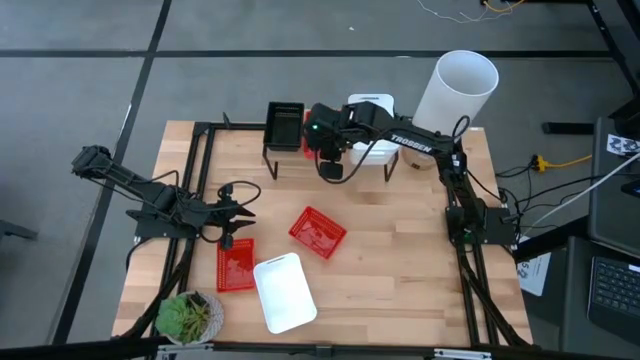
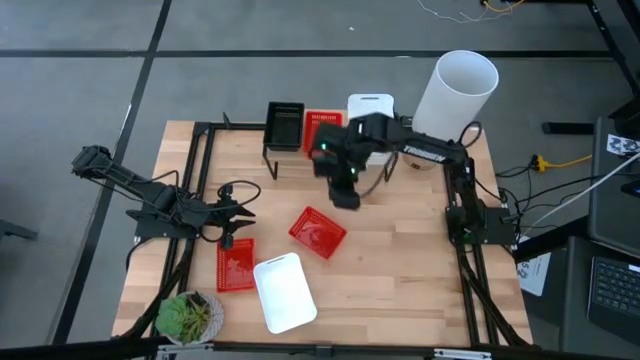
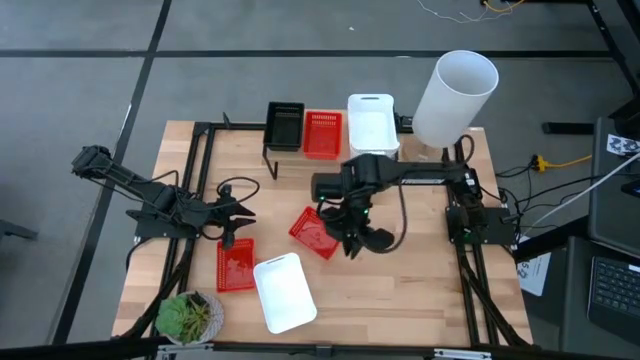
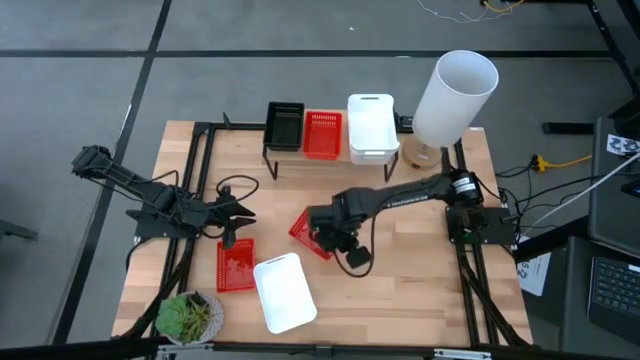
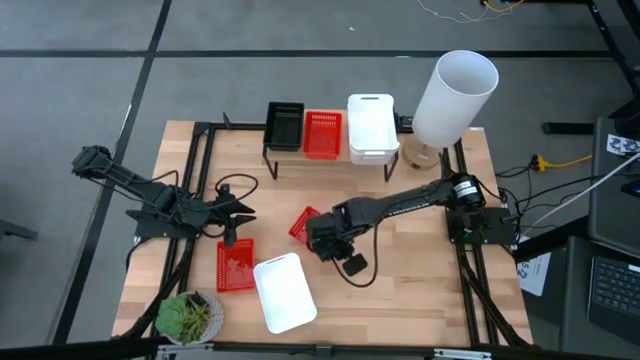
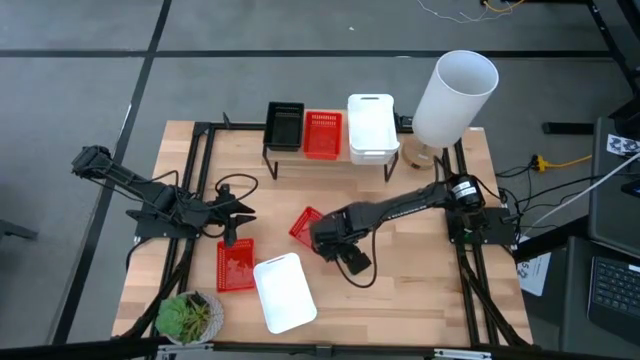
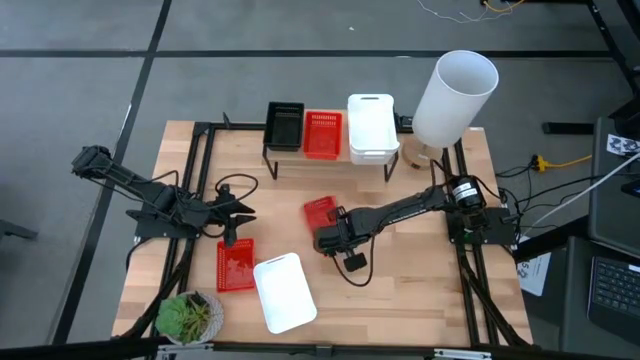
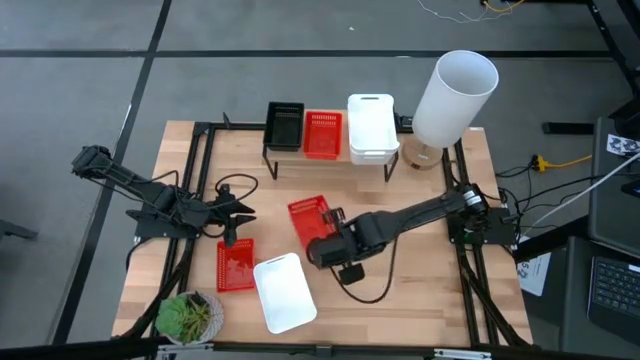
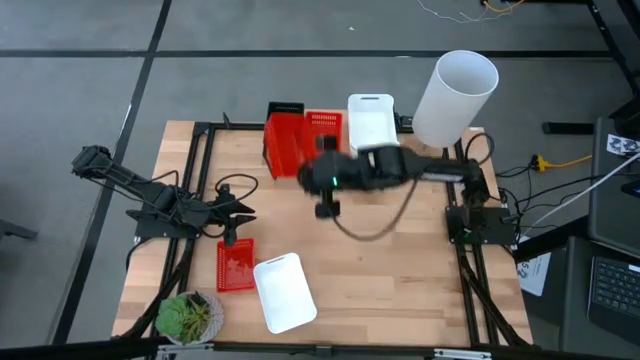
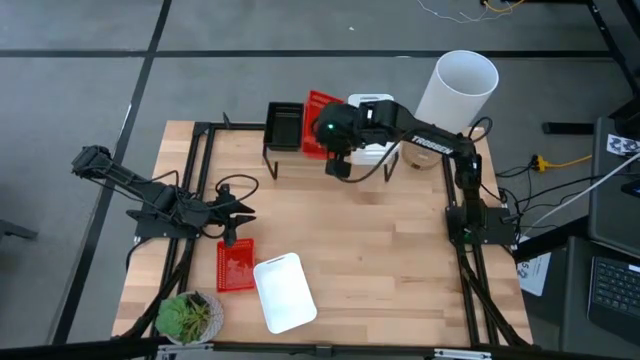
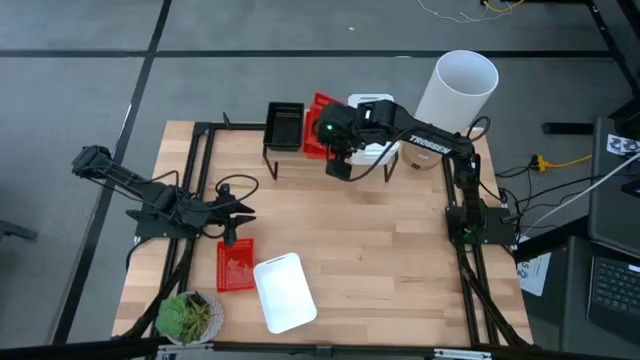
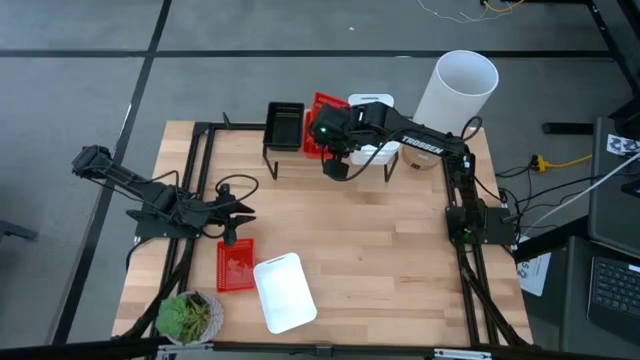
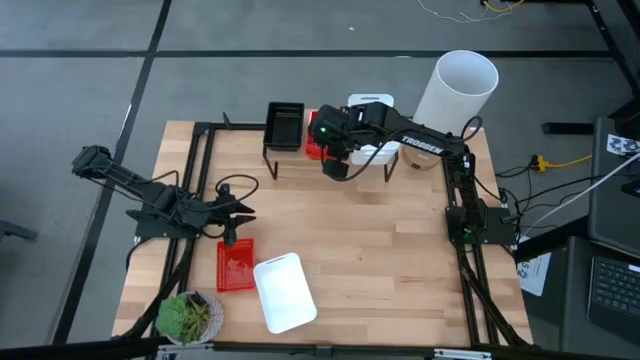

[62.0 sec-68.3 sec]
Task: Stack baskets on shelf by color
Stack the right red bin on top of the red bin on the shelf

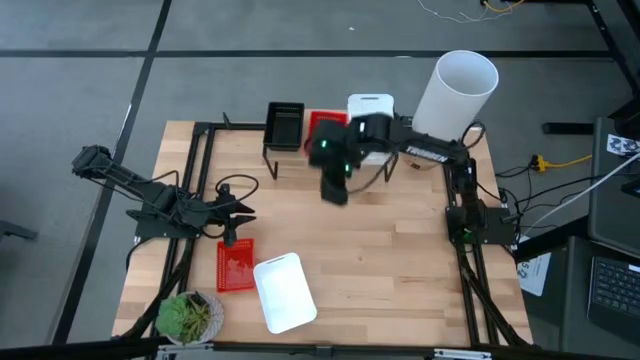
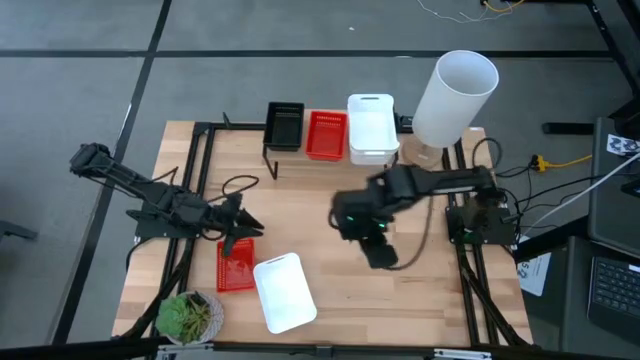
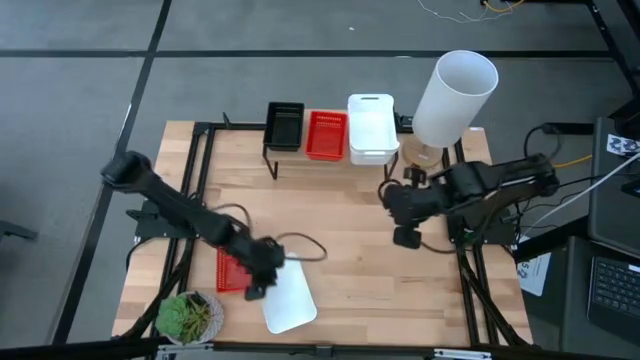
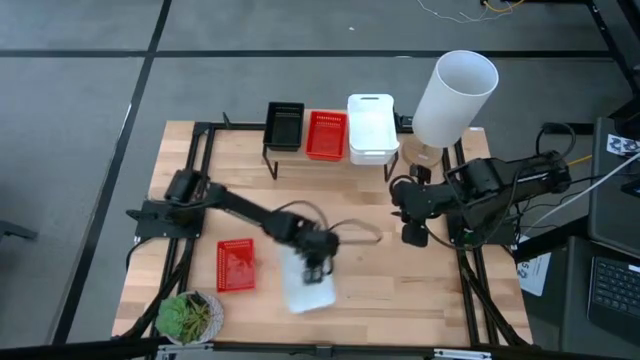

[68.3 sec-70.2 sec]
Move the white bin to the middle of the table

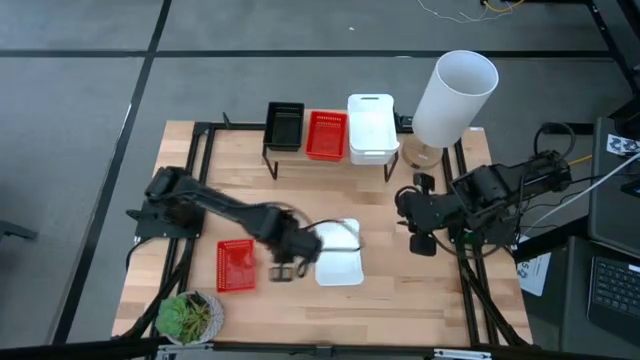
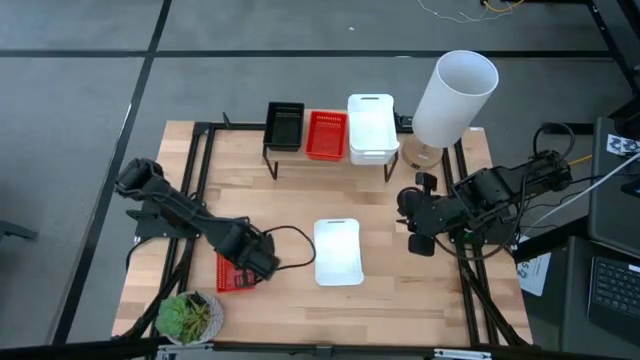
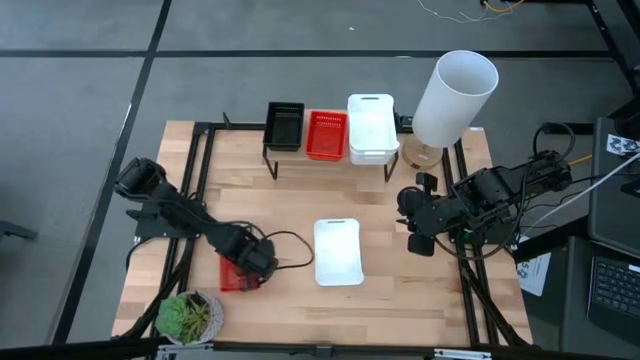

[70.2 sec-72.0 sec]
Move the red bin to the middle of the table

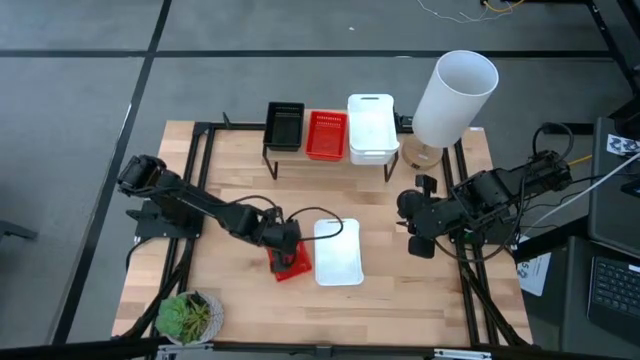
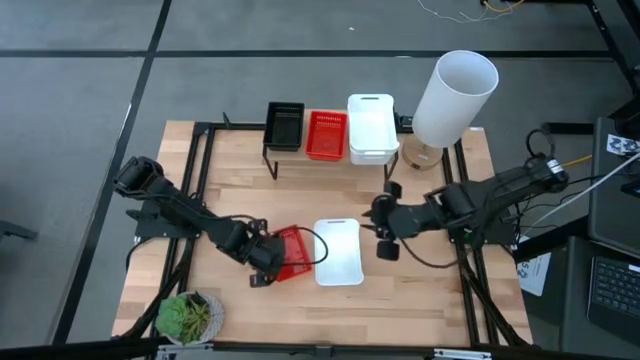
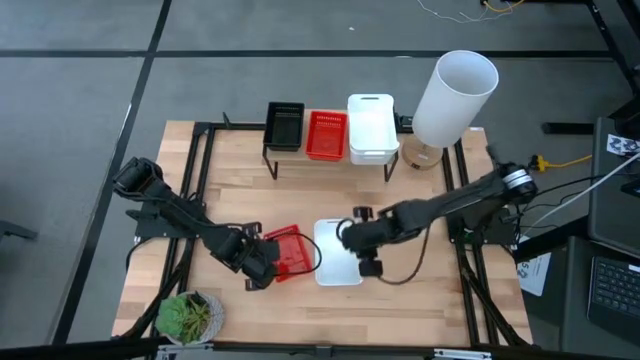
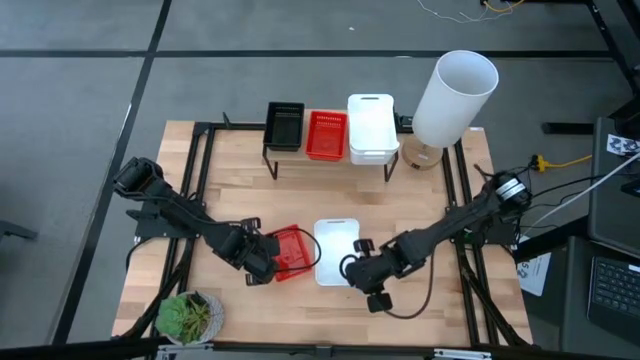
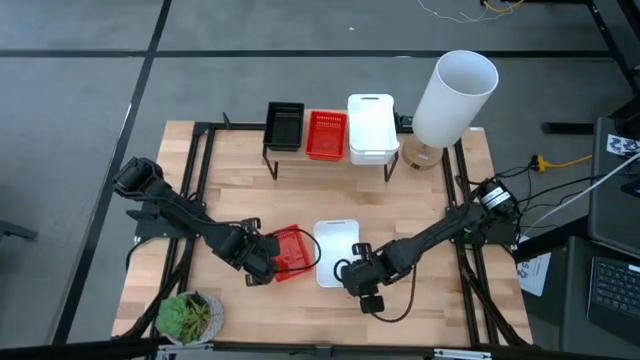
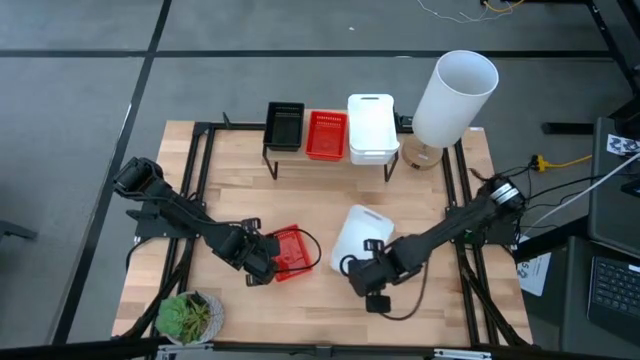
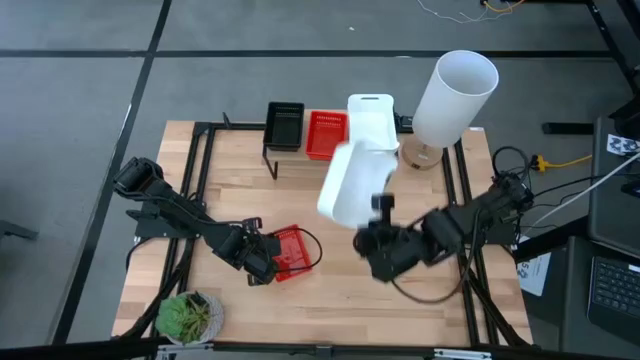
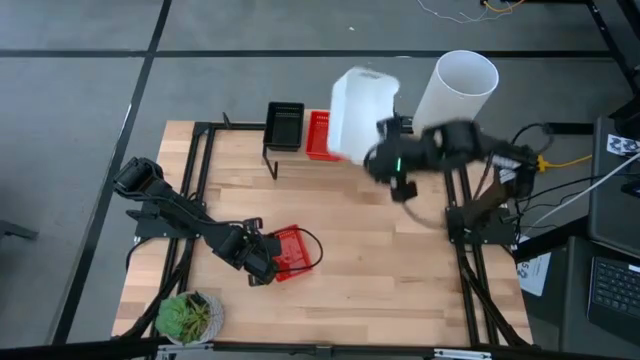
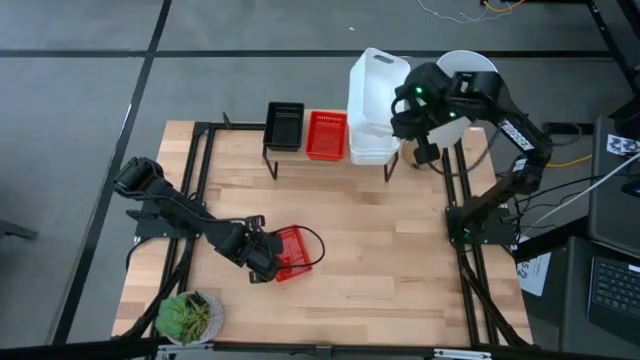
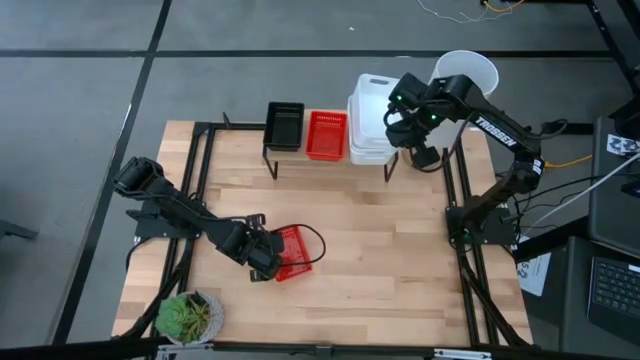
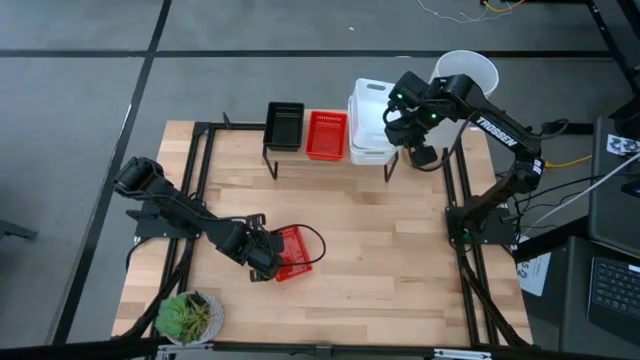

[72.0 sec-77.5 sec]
Stack the white bin on top of the white bin on the shelf

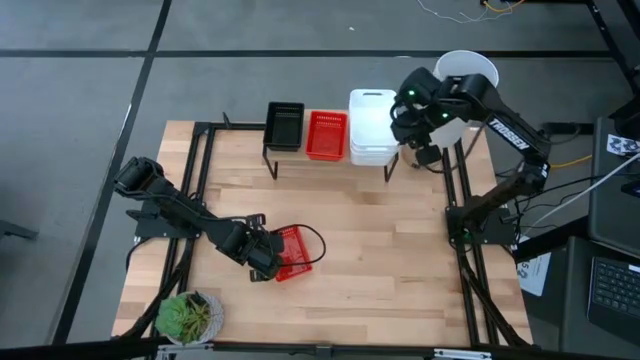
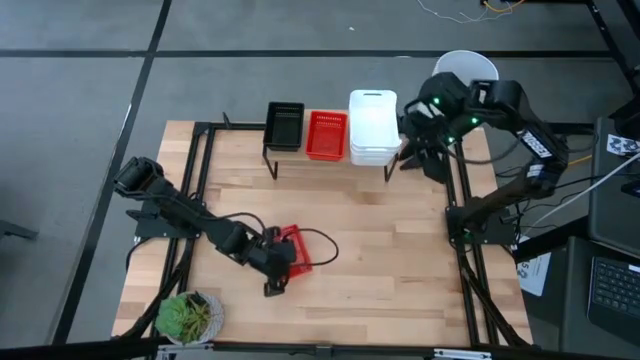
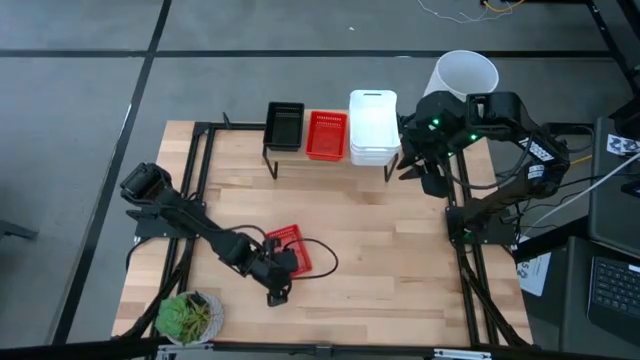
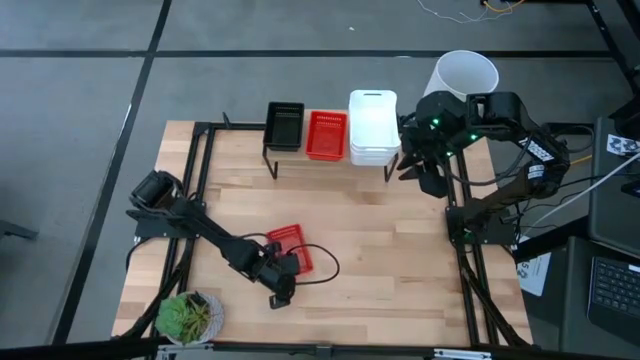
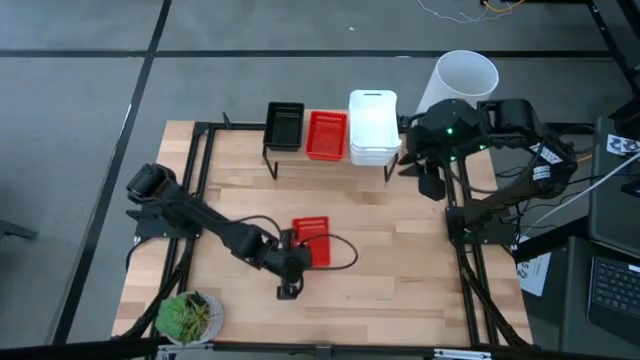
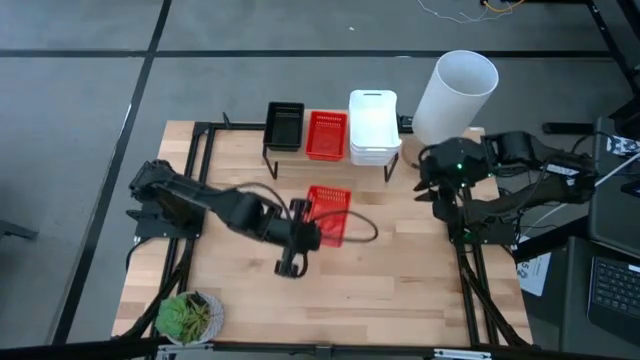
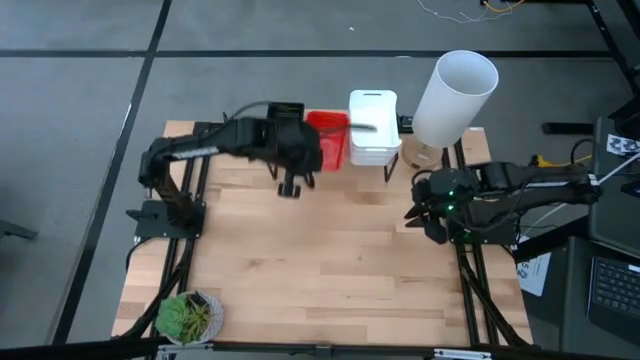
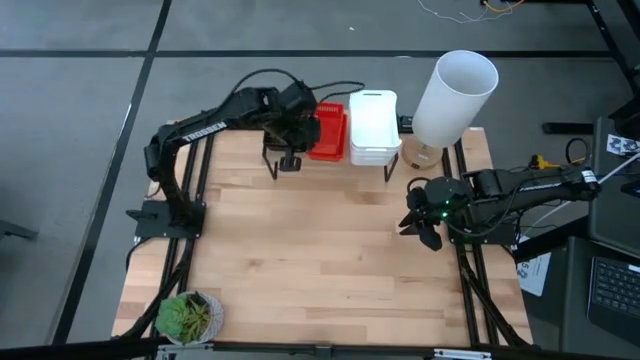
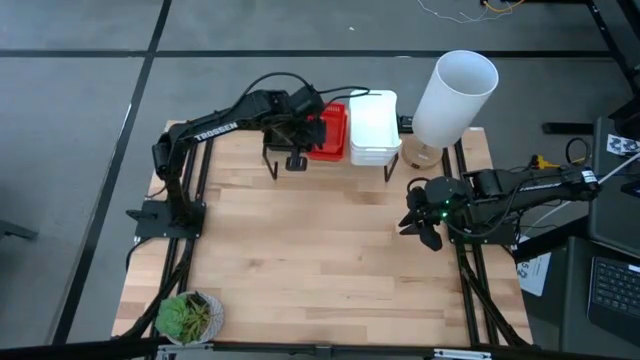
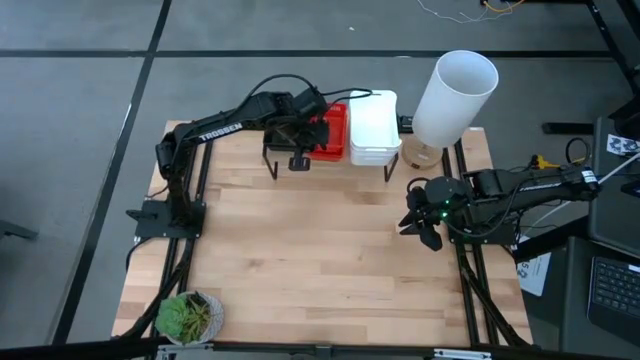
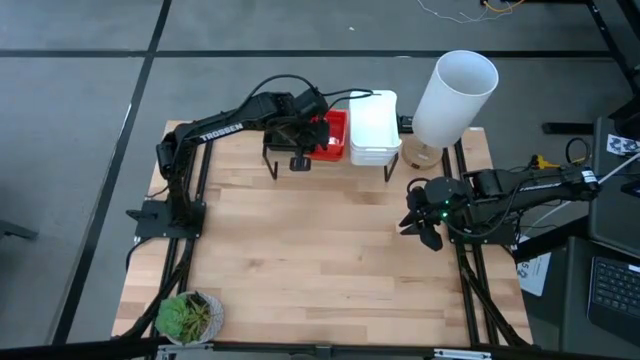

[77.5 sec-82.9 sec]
Stack the red bin on top of the red bin on the shelf
